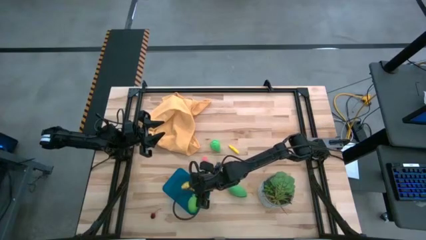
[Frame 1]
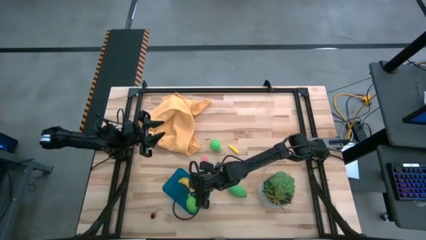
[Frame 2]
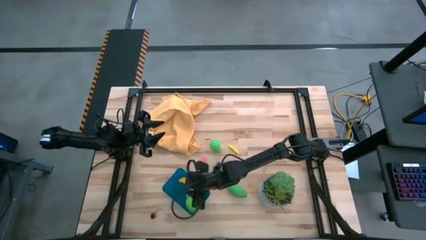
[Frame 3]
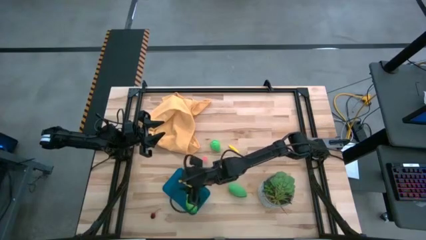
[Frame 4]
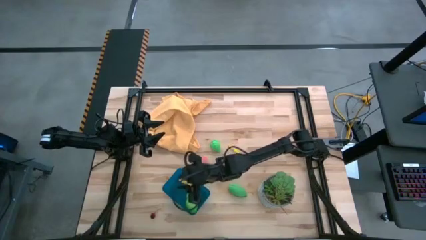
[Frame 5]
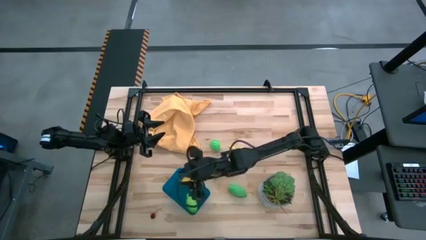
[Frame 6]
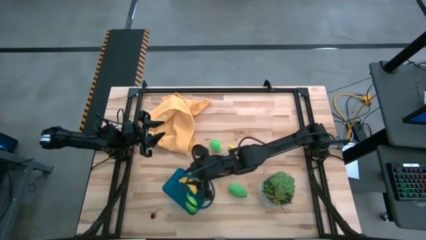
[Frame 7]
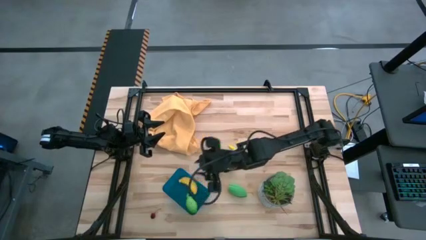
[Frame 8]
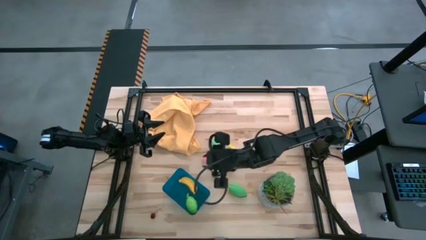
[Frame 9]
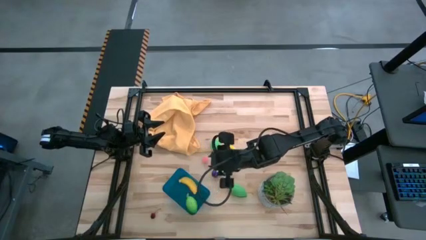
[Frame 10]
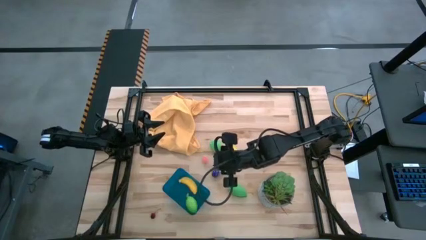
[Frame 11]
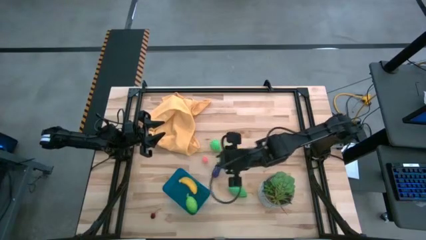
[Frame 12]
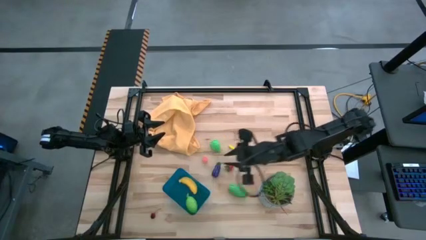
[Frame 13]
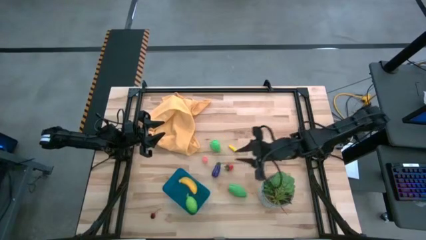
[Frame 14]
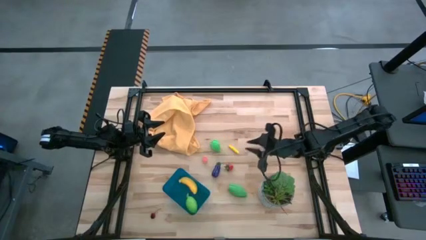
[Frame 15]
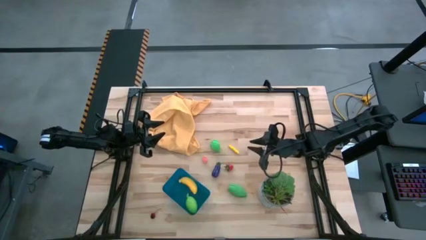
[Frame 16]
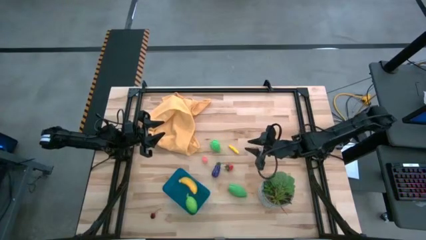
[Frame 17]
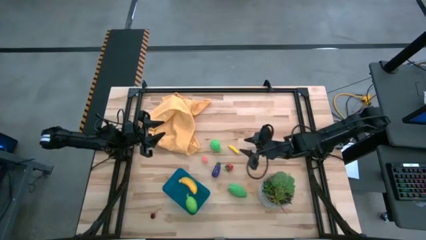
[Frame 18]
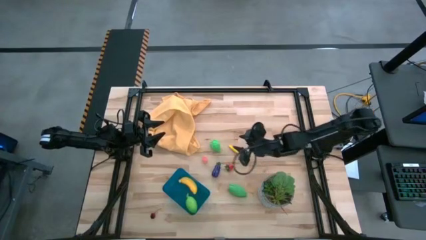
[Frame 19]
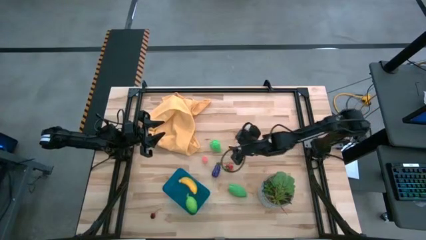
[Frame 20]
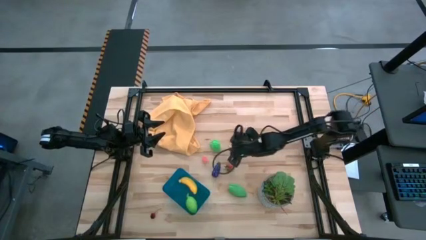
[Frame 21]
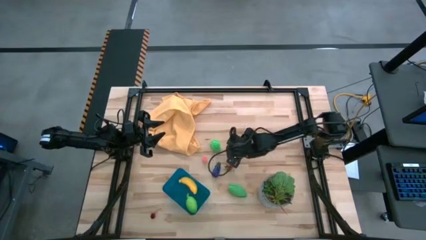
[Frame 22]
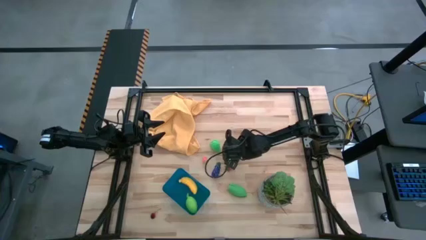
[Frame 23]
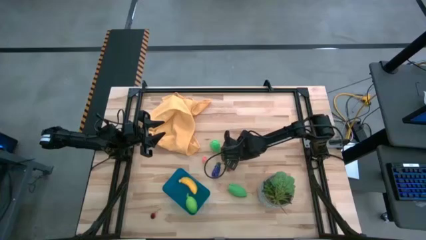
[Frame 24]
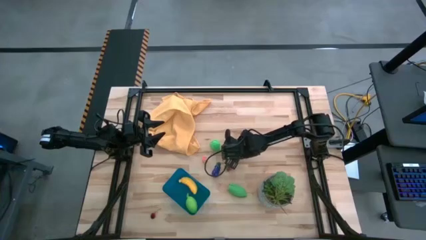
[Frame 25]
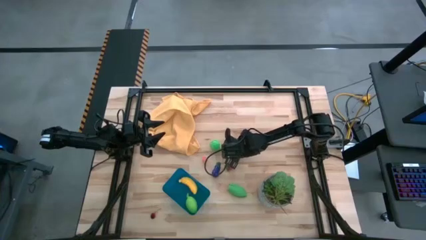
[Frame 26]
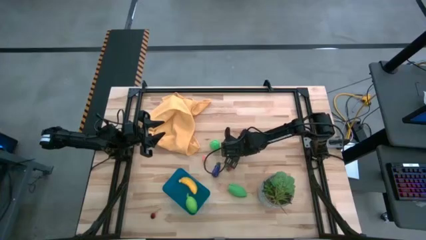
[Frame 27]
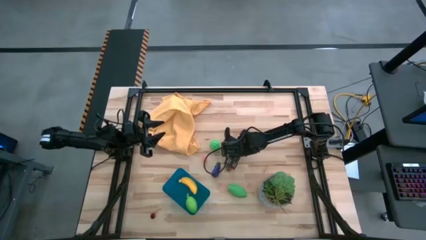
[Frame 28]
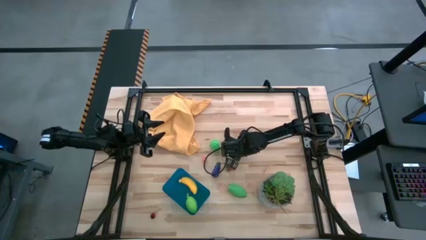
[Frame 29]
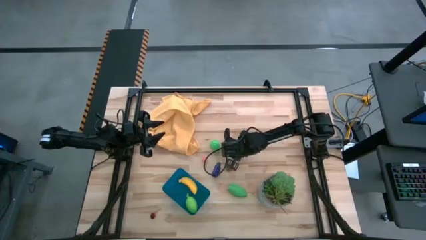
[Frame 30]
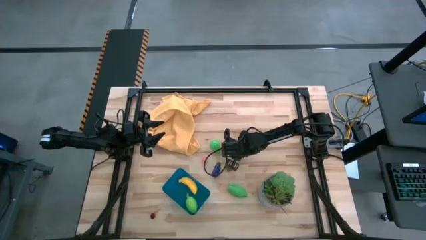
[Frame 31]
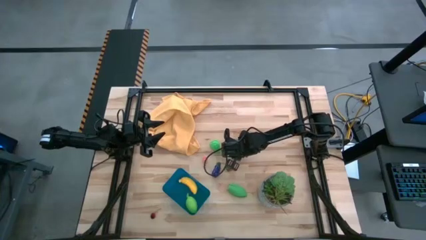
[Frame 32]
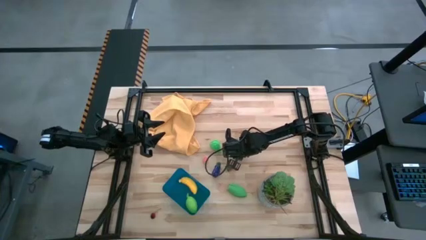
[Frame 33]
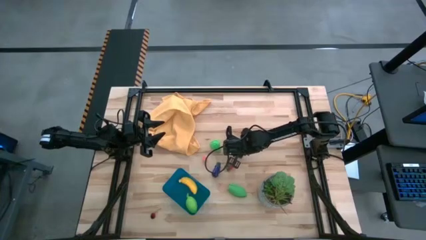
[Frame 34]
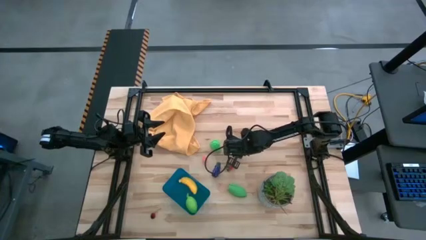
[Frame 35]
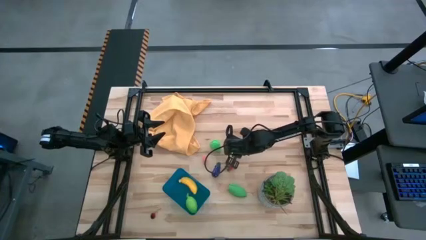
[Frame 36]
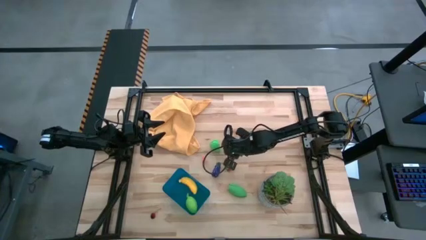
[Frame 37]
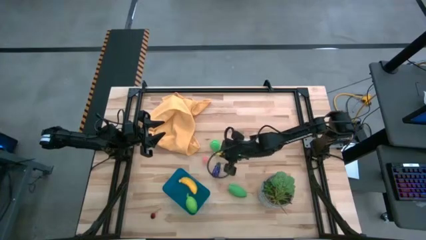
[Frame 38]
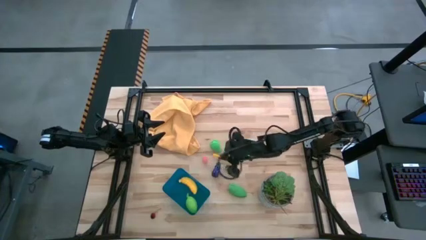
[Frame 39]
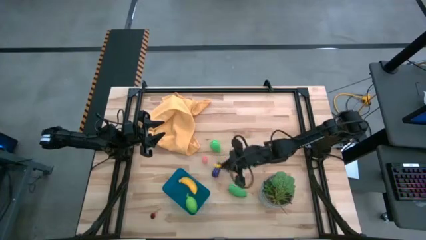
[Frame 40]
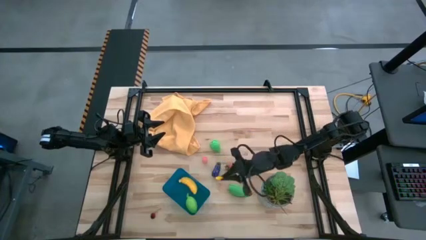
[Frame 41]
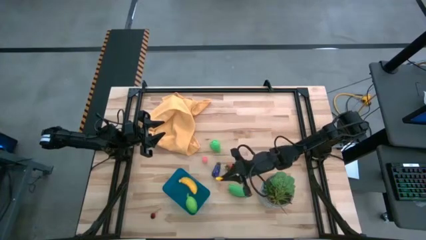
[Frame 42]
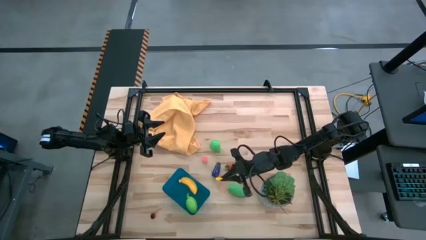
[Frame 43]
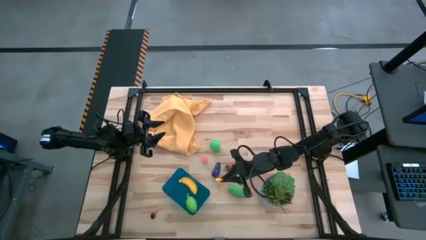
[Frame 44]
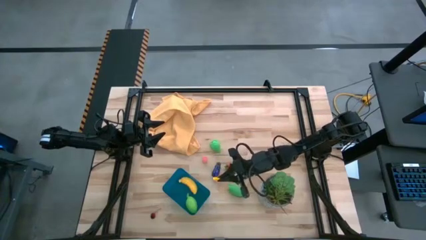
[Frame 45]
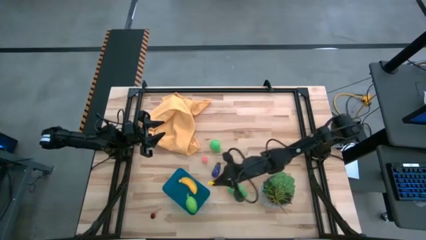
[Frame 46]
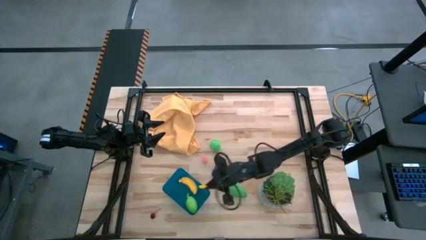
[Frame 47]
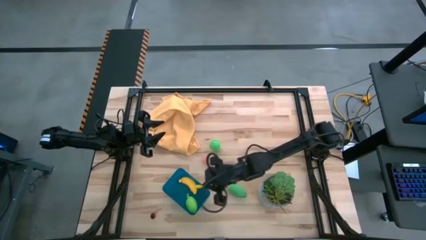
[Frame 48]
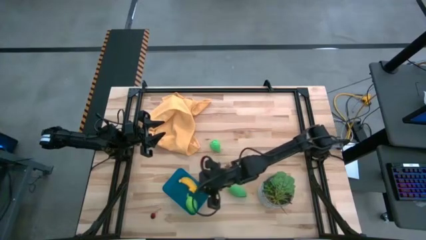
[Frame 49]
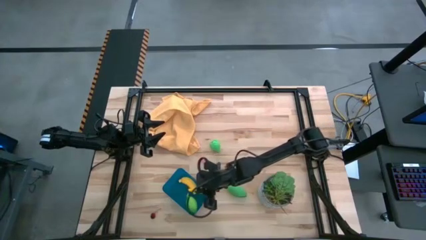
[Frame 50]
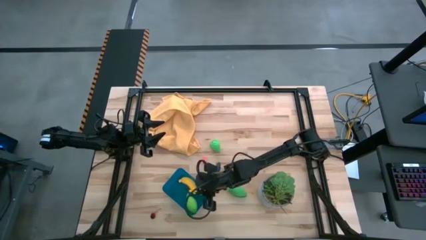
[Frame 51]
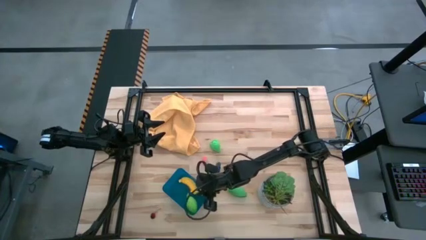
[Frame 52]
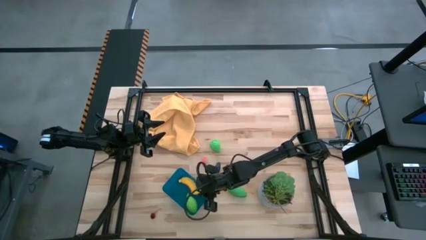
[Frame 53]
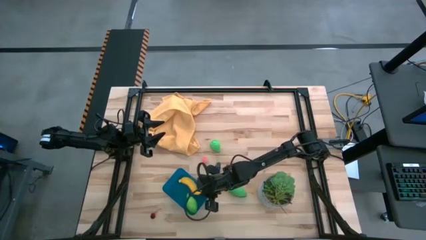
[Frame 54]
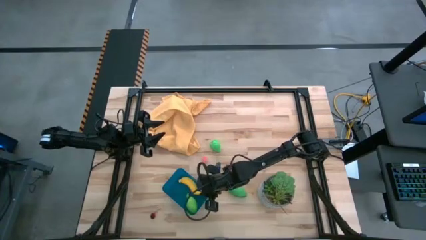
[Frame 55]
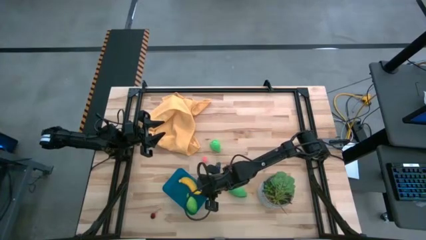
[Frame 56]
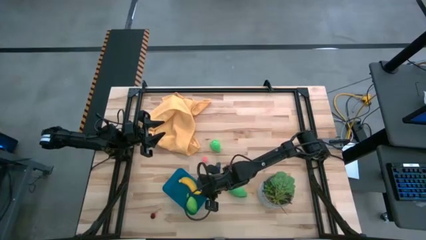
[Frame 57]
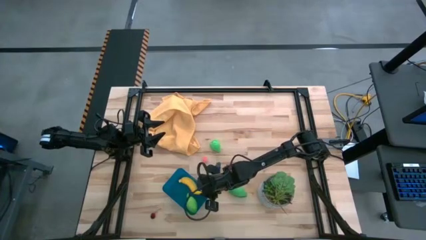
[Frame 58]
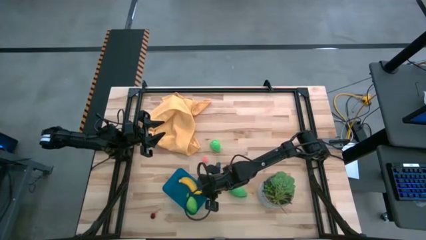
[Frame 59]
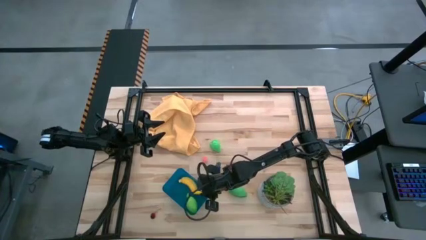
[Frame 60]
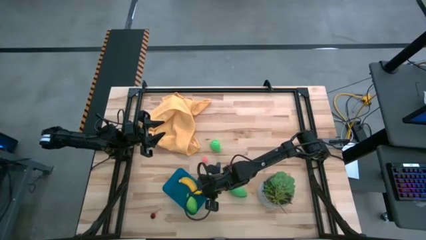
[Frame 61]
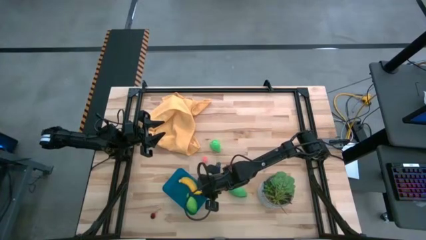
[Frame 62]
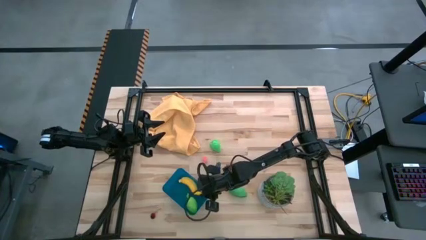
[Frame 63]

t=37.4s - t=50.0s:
Task: Pick and placing Produce into tupperware
Put the corn into the blue bin

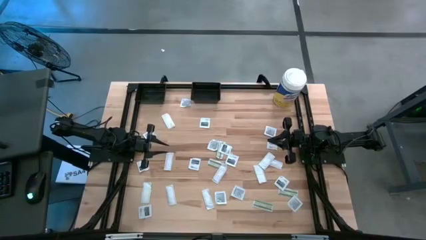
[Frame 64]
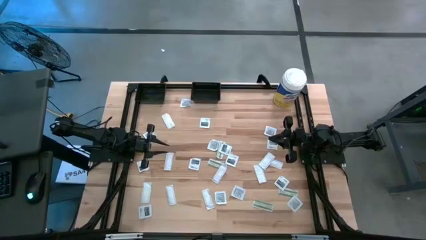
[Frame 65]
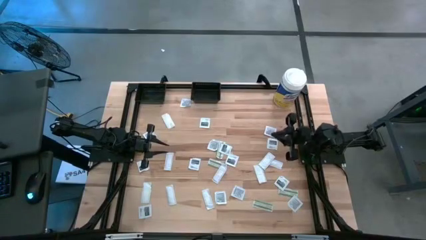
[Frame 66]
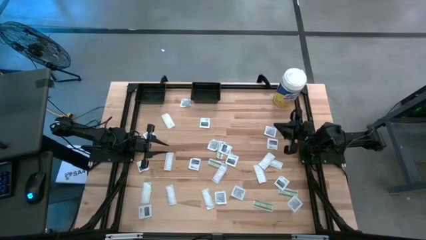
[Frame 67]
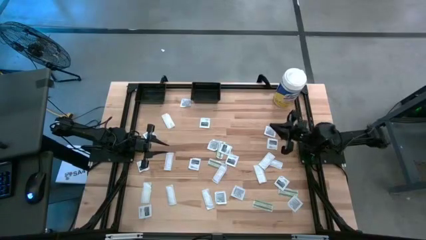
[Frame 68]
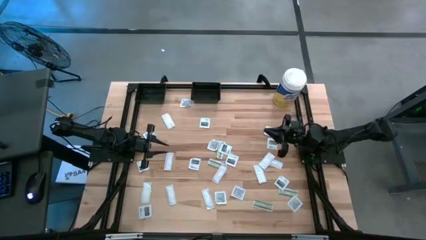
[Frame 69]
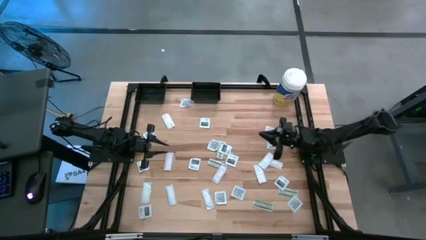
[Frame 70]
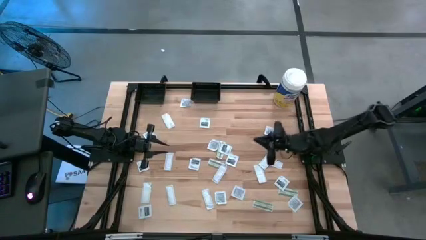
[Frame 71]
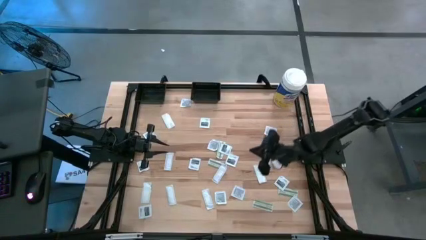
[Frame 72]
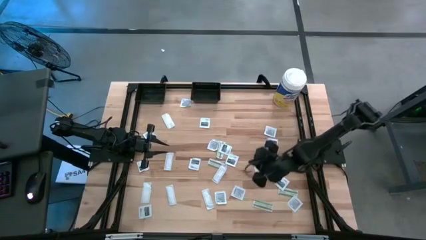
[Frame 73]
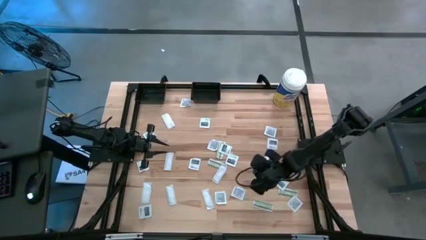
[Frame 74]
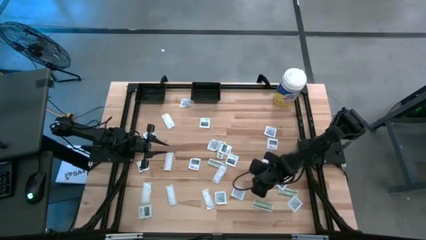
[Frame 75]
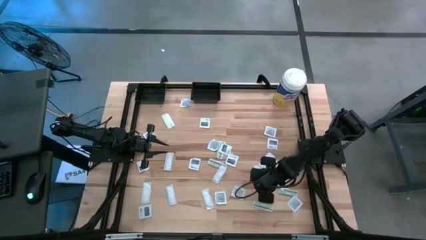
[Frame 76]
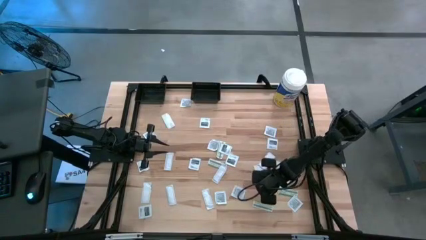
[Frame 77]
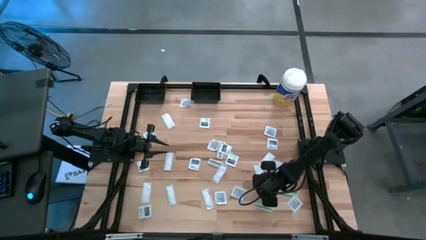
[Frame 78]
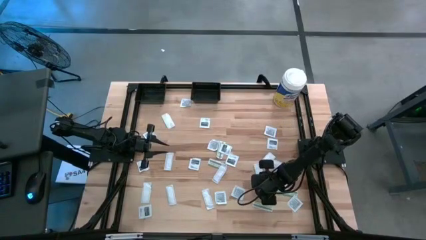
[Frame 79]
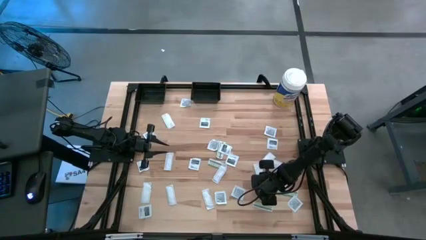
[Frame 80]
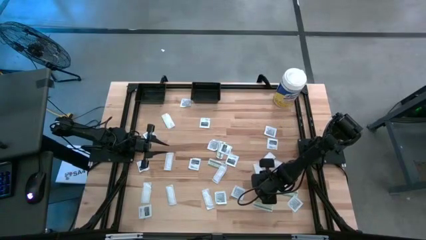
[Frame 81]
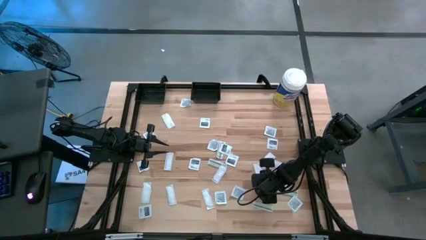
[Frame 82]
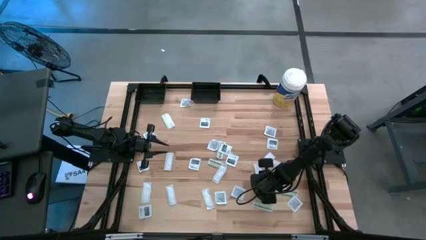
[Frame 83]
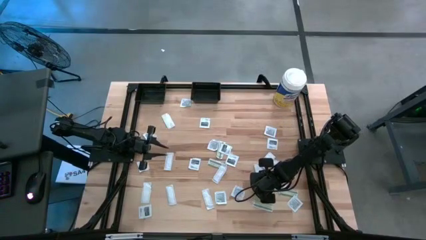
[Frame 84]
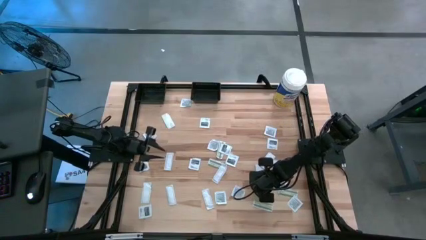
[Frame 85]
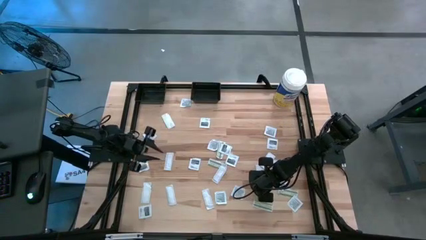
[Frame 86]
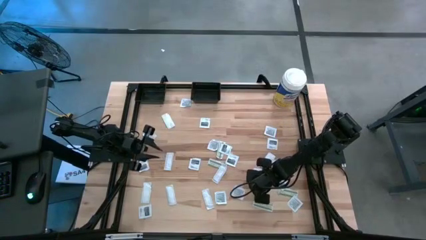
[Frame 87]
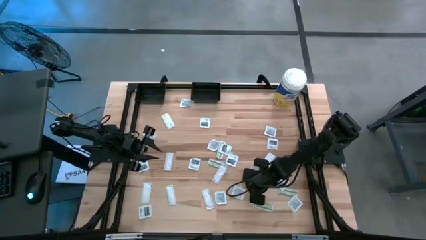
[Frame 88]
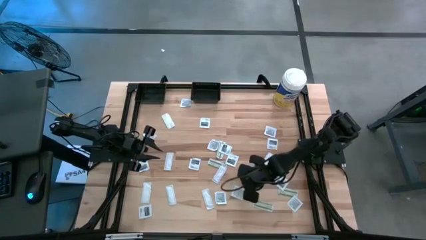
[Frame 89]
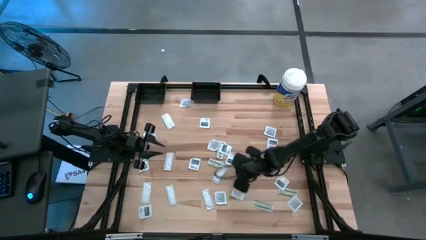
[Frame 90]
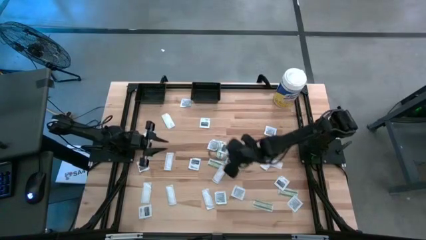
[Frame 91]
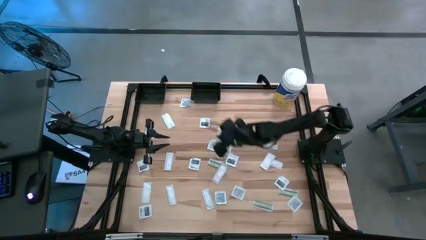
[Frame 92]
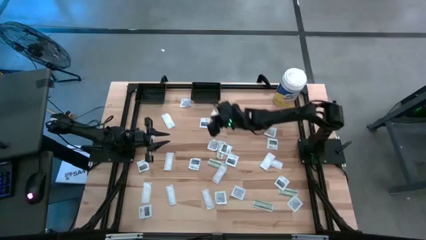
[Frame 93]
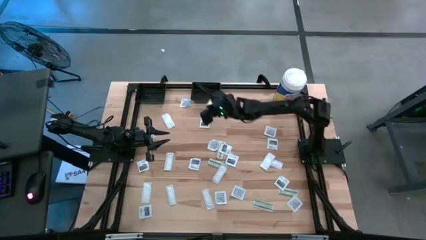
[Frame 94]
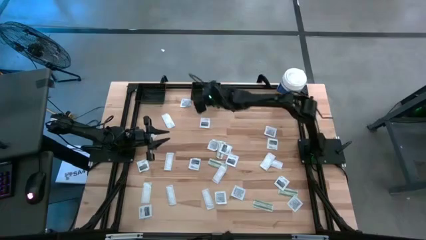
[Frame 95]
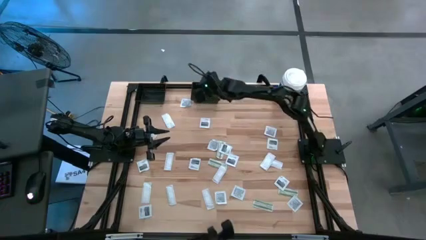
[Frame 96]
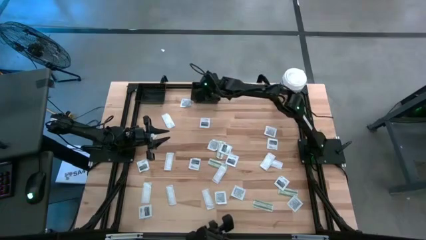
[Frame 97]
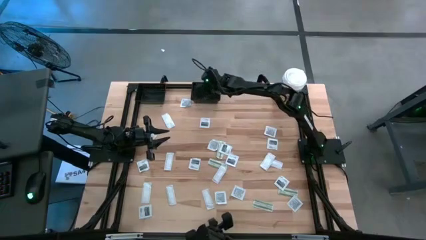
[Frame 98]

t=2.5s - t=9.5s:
Task: Pick & Place First Aid Supplies
Put the green bandage pack into the right black bin
